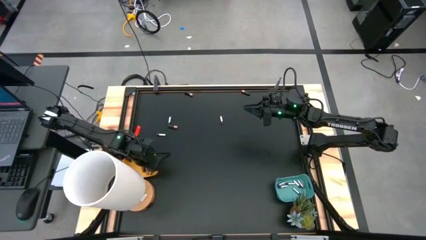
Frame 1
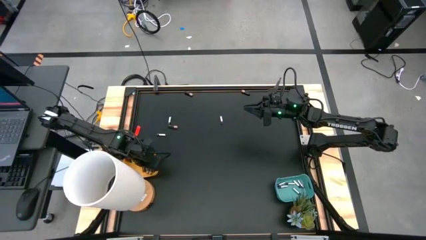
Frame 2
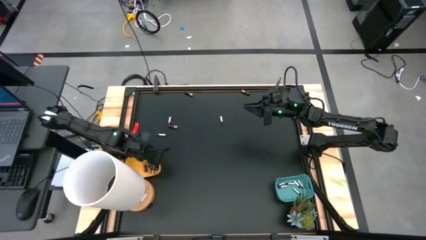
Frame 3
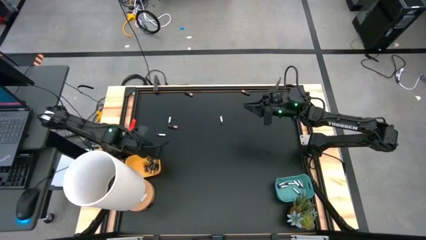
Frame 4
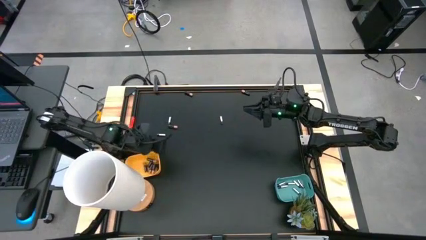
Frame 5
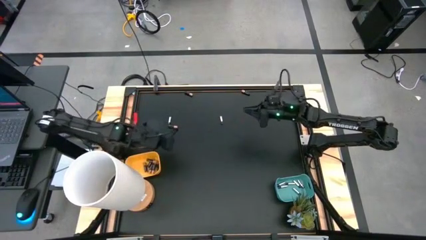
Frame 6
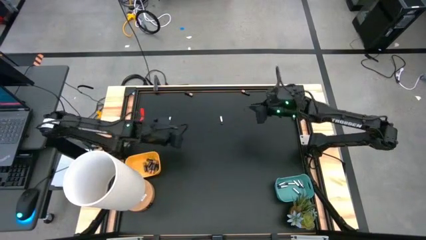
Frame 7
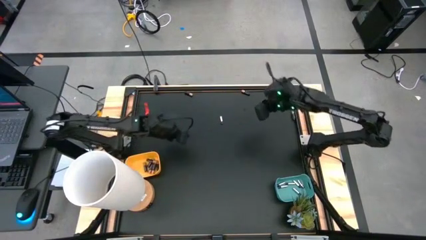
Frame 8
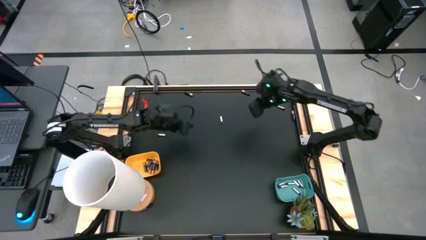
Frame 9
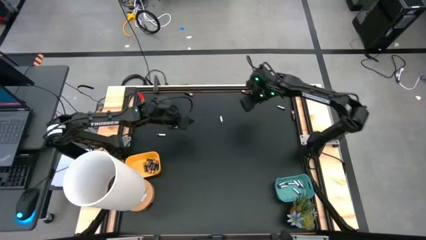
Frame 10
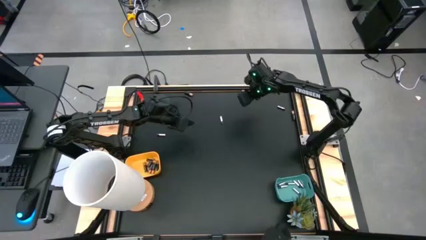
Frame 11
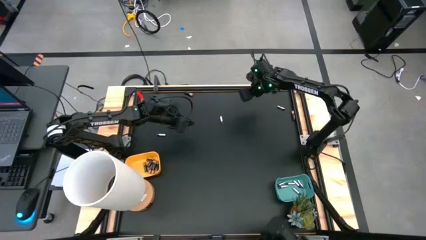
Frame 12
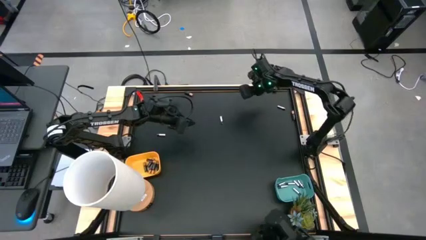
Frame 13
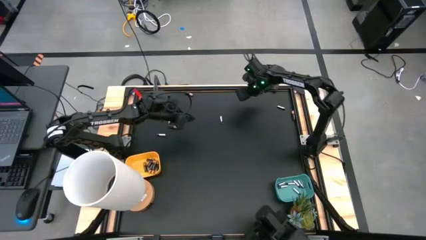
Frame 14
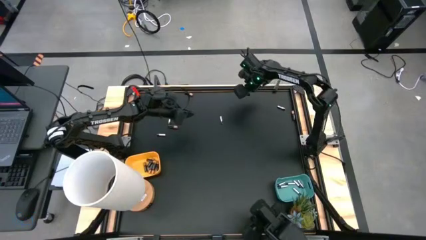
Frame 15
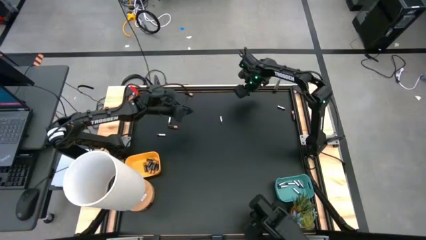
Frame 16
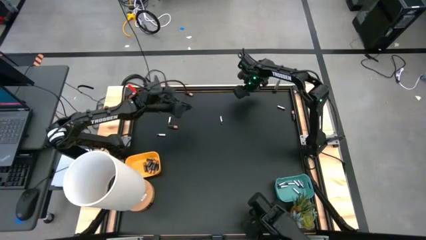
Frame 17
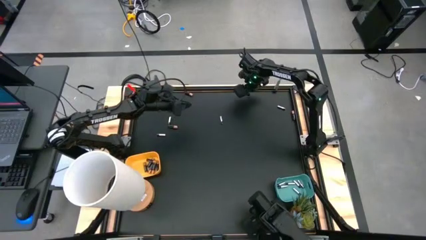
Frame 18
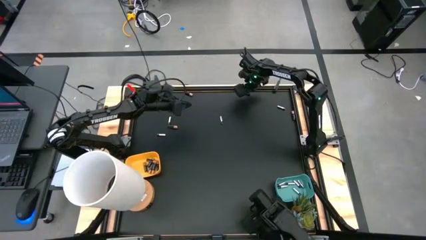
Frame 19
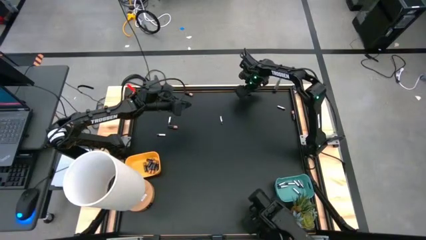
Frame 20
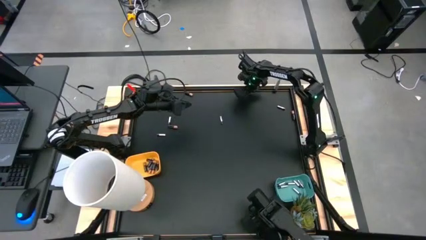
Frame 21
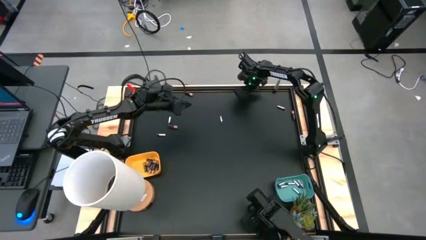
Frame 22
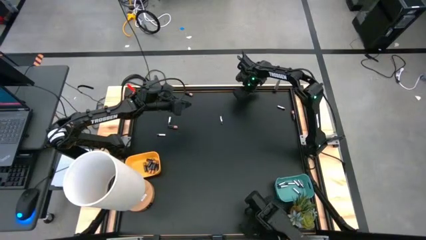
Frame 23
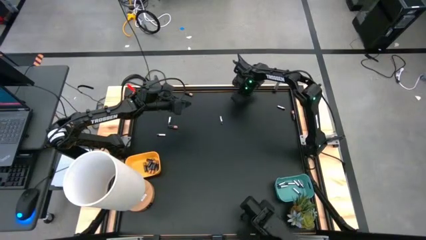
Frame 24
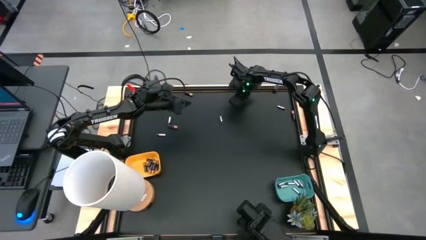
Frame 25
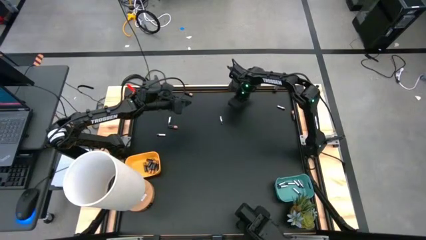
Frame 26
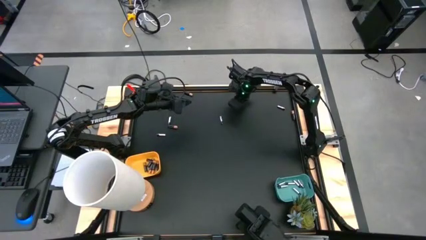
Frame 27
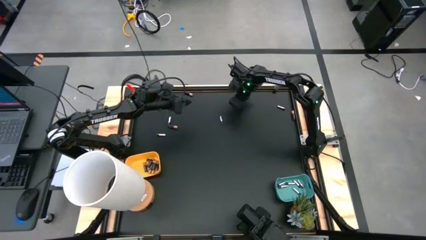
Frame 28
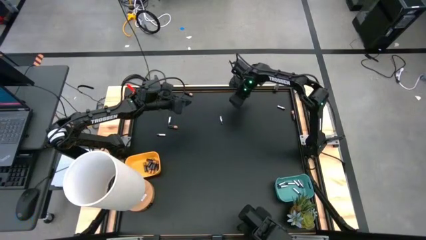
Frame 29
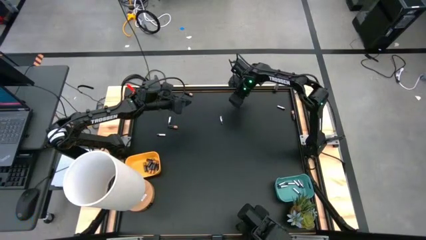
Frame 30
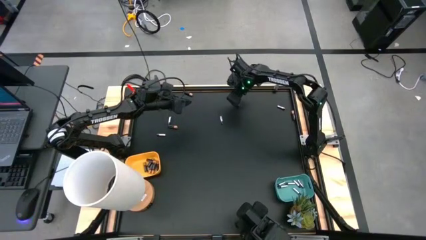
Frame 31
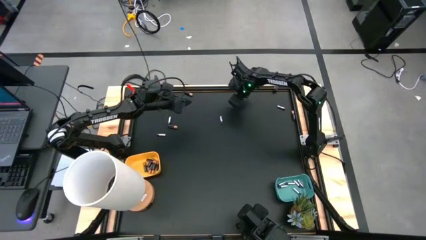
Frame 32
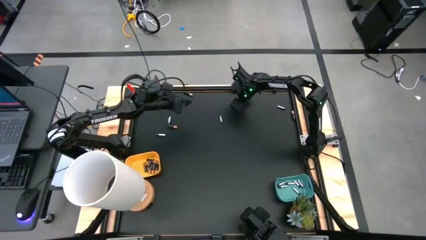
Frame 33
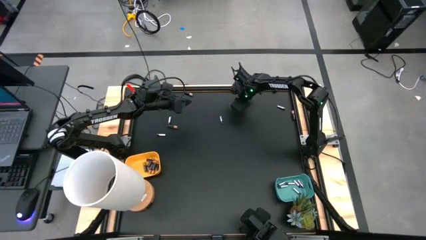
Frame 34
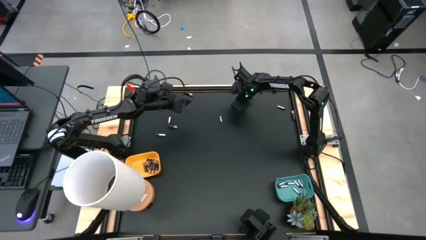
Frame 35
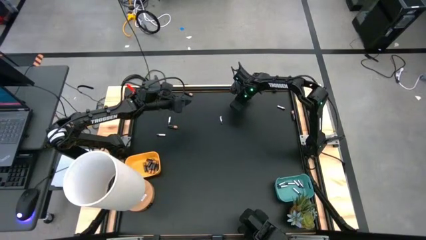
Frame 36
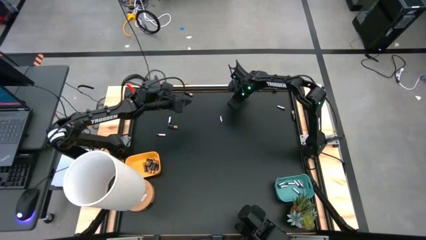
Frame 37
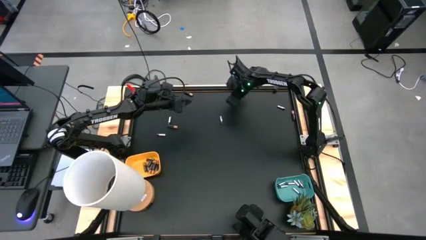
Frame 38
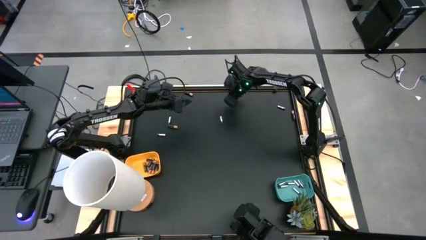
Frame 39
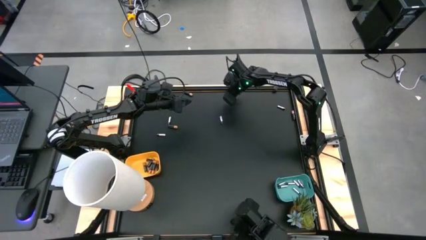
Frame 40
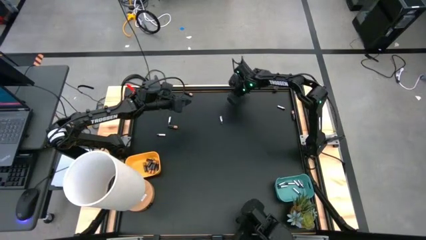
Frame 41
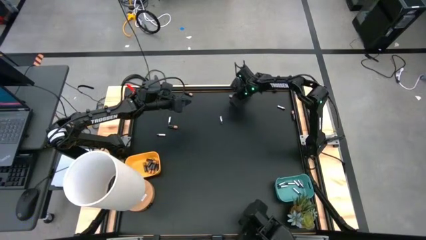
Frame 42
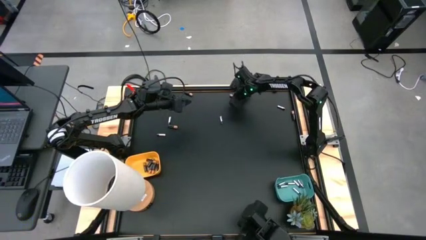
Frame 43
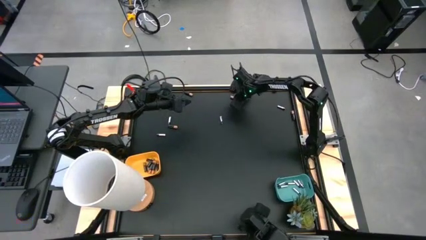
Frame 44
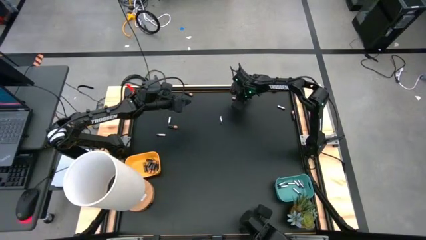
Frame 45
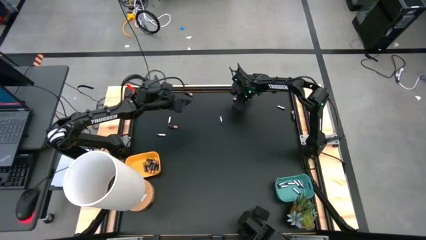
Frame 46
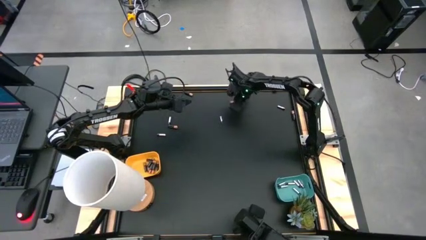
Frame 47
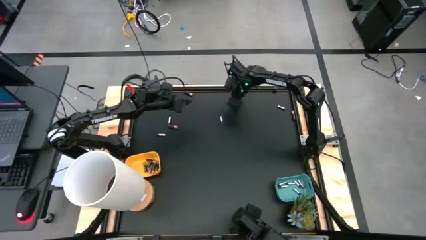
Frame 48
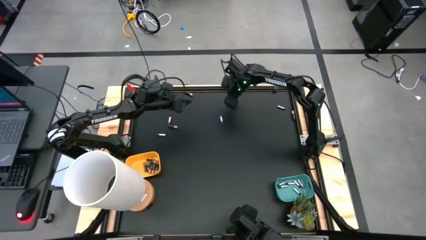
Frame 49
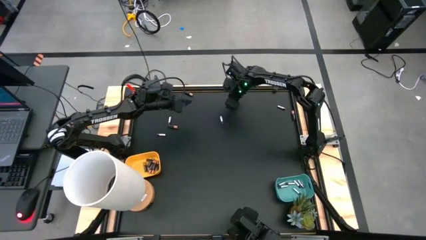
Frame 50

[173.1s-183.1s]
Task: Sort batteries
Put the black battery into the yellow bin

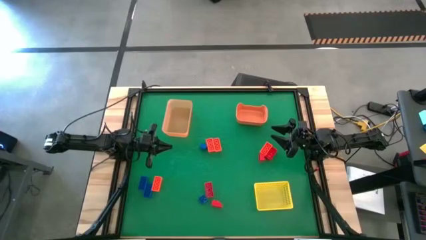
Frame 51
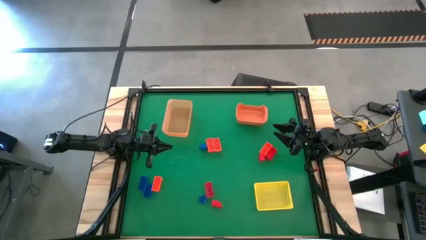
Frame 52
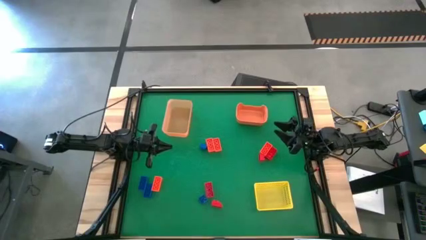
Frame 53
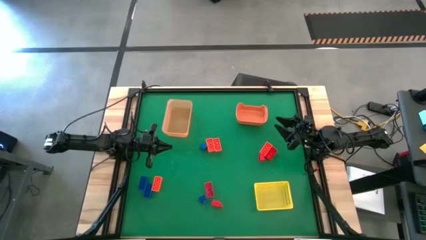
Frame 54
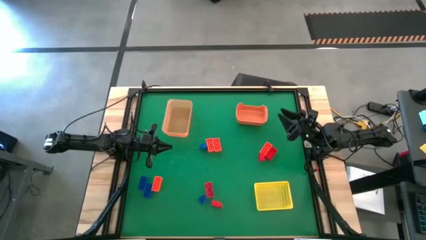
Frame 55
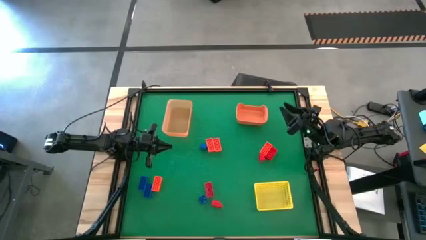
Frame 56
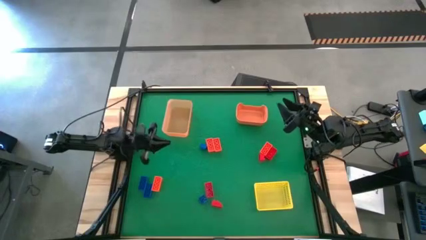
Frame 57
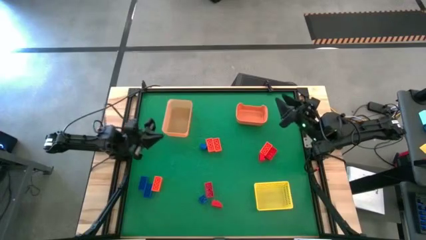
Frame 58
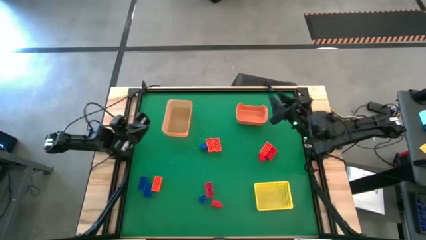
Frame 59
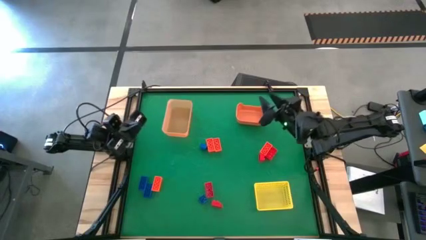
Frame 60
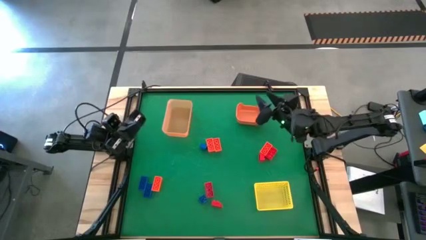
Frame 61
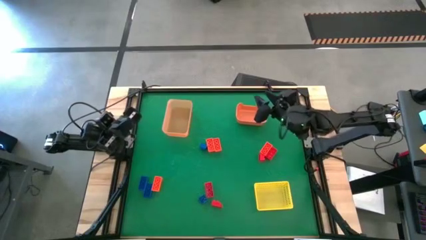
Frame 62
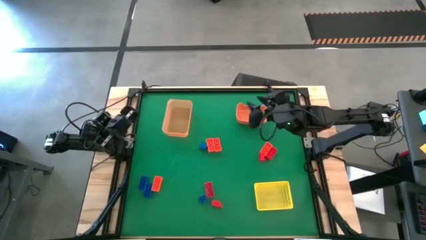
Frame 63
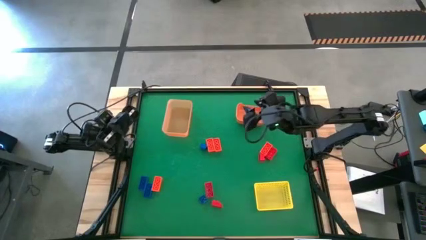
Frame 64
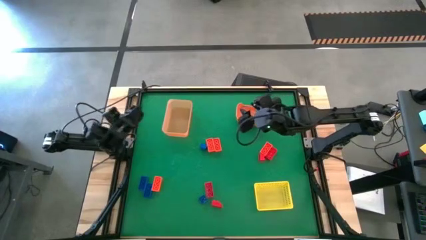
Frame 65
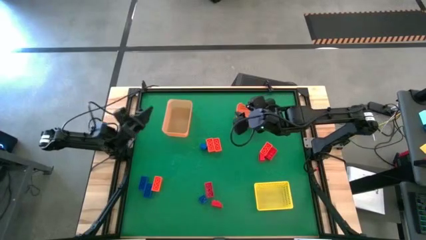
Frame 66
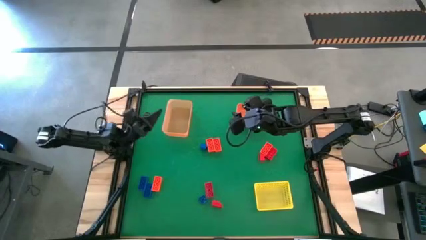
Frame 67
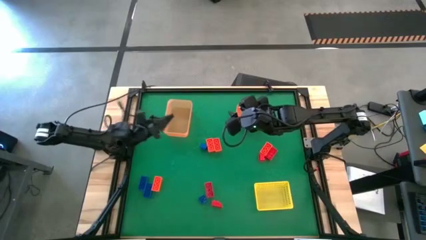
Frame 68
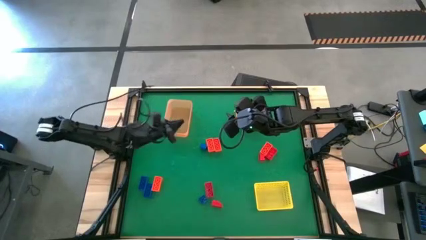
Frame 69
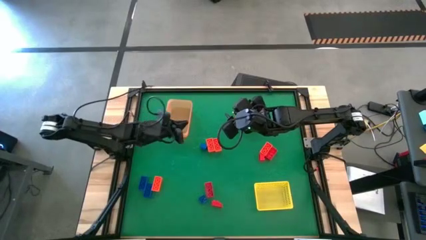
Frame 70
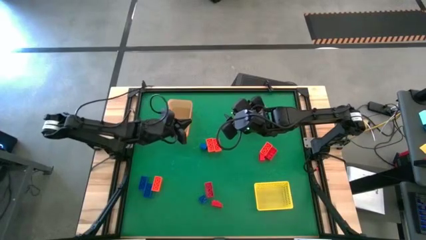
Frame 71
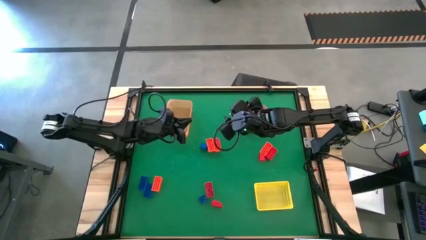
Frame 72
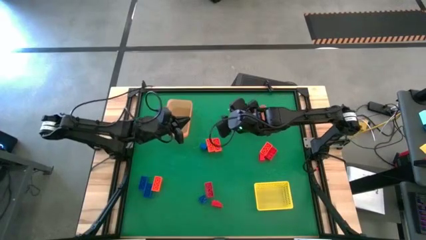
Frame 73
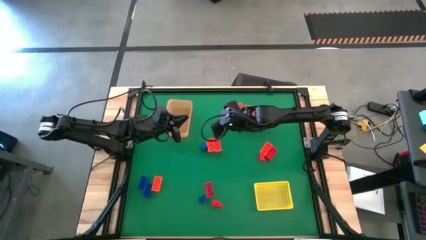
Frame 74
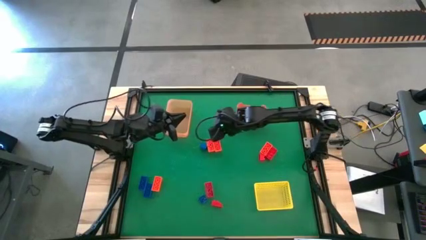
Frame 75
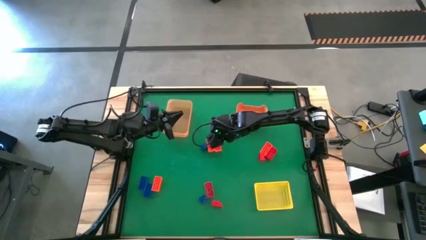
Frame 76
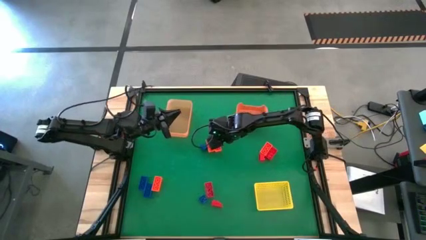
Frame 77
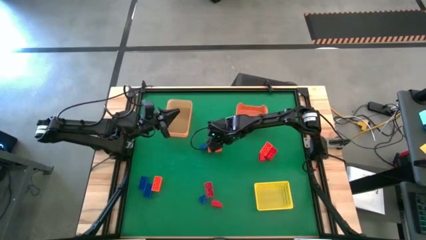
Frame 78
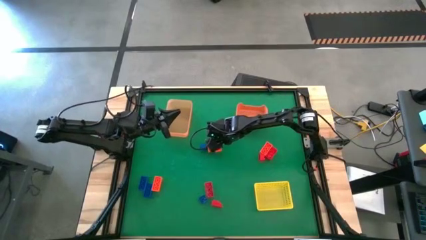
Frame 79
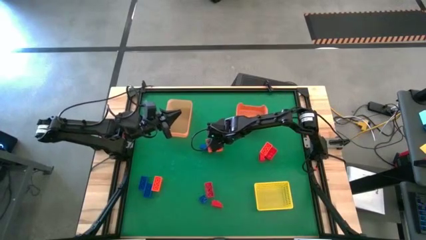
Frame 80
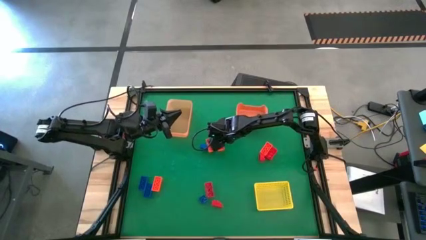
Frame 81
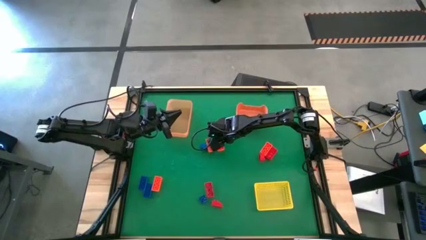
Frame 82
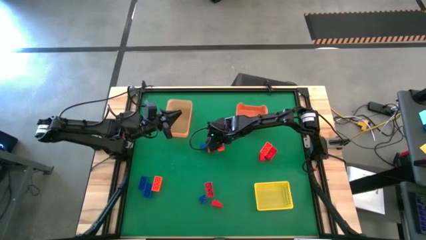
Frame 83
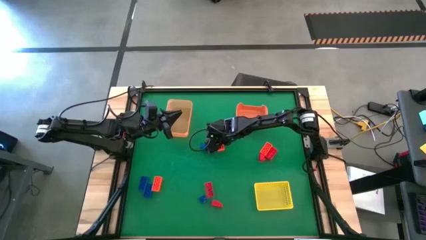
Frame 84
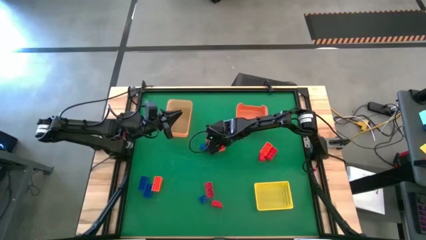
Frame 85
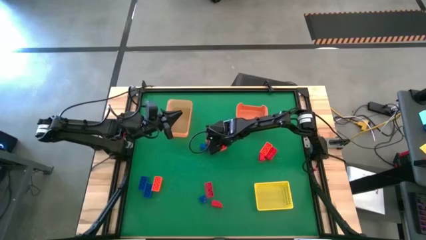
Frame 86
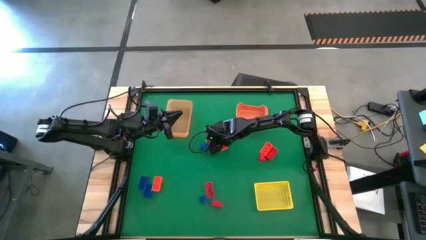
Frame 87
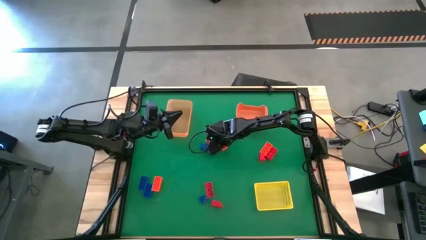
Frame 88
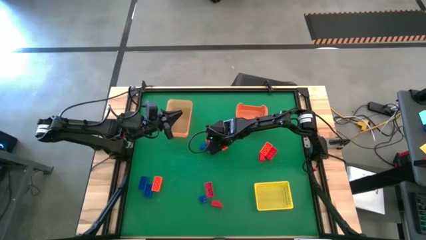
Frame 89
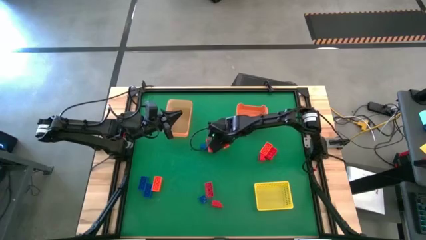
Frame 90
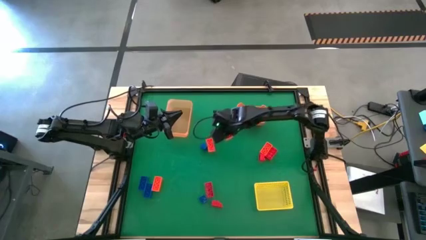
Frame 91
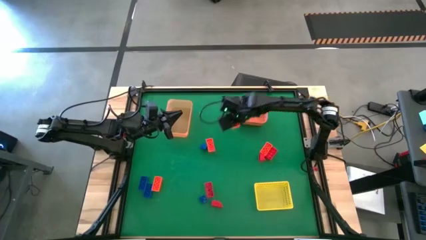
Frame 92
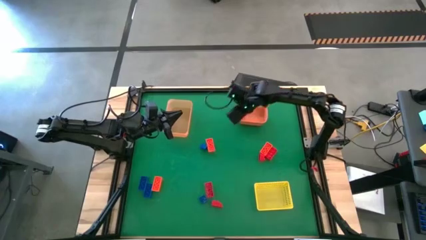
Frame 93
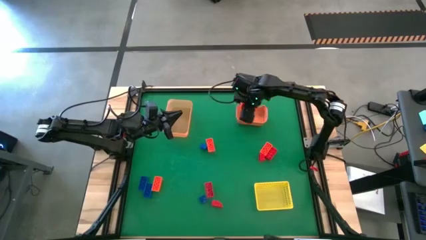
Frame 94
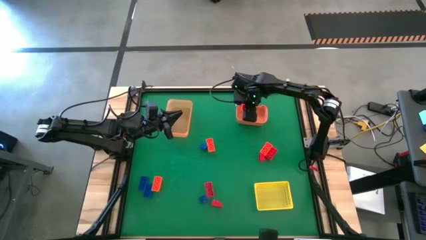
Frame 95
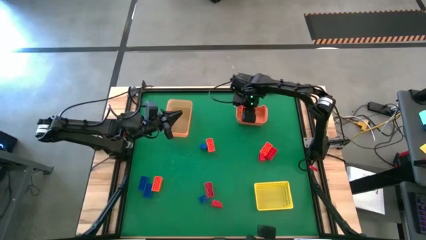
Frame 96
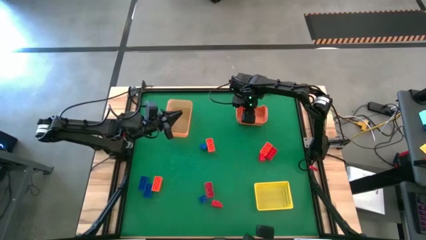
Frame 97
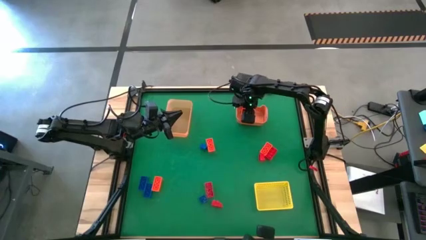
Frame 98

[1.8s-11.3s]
Task: Sort & place blocks by color
Put the orange game piece into the right orange bin
